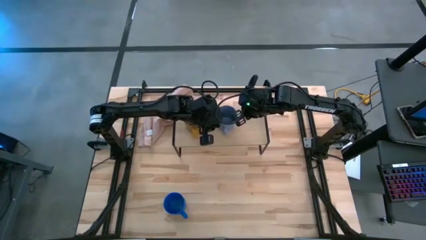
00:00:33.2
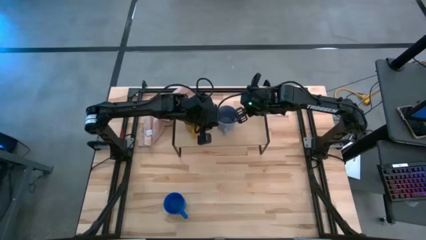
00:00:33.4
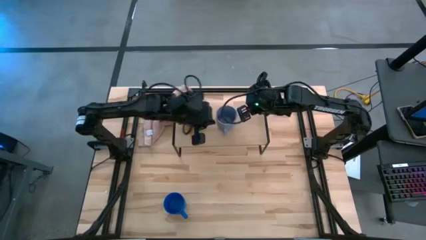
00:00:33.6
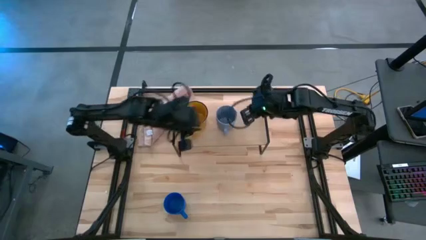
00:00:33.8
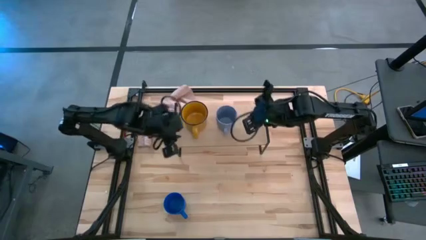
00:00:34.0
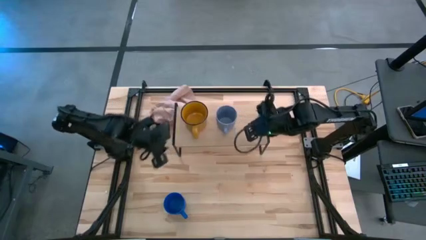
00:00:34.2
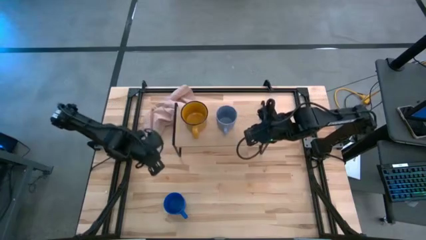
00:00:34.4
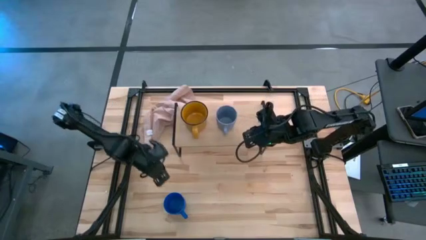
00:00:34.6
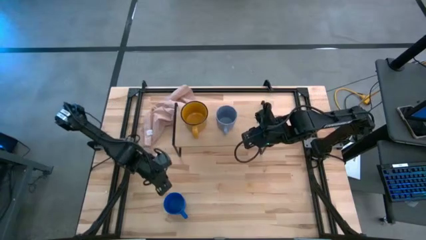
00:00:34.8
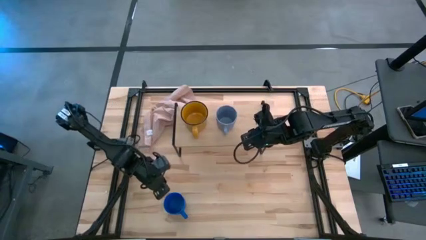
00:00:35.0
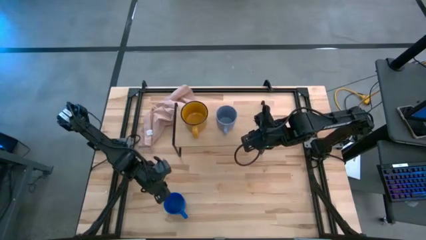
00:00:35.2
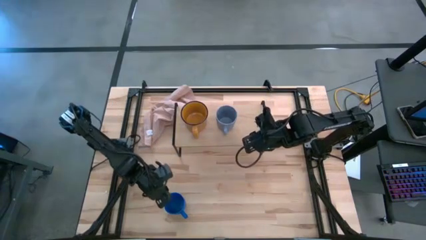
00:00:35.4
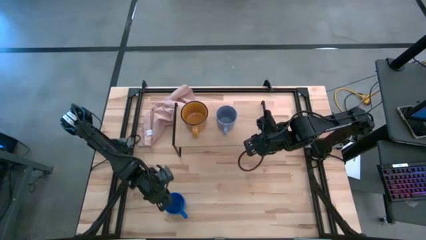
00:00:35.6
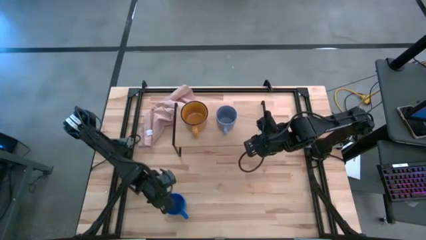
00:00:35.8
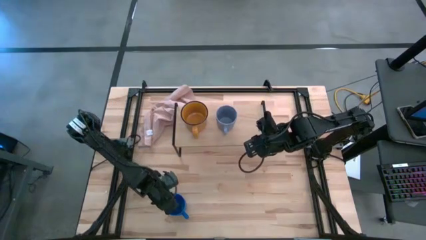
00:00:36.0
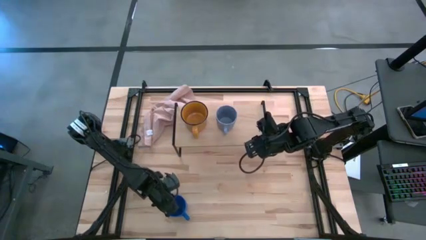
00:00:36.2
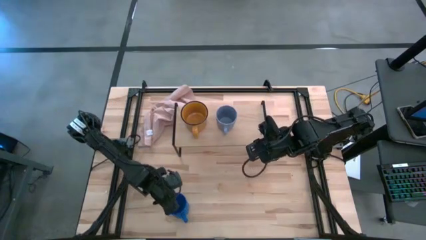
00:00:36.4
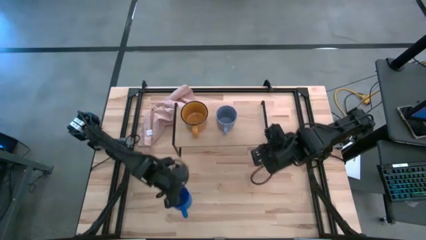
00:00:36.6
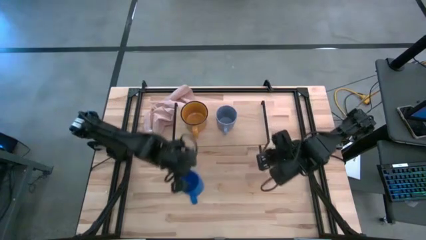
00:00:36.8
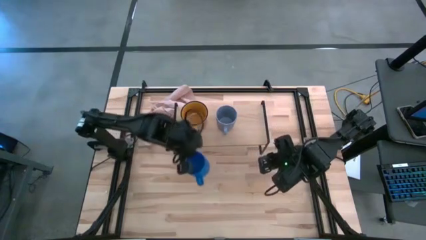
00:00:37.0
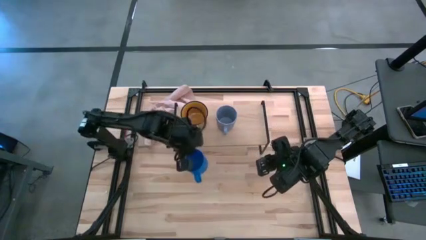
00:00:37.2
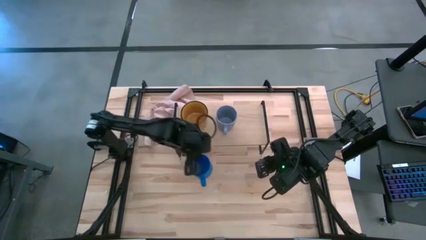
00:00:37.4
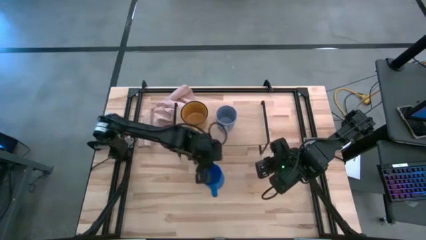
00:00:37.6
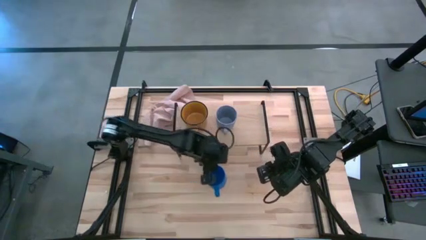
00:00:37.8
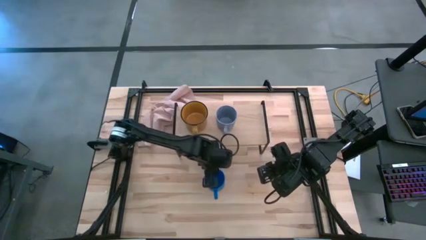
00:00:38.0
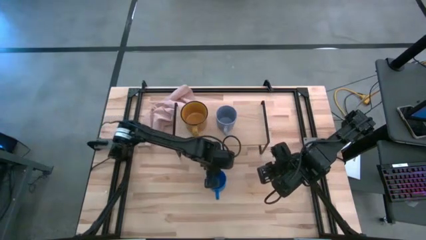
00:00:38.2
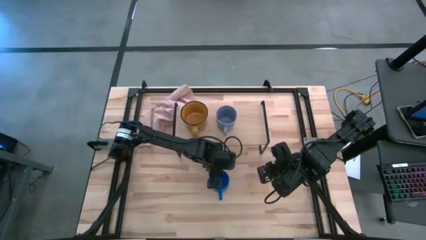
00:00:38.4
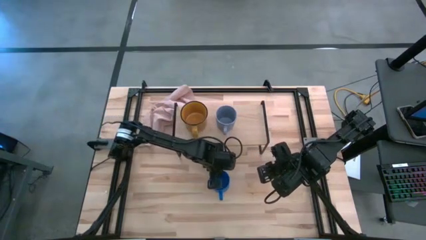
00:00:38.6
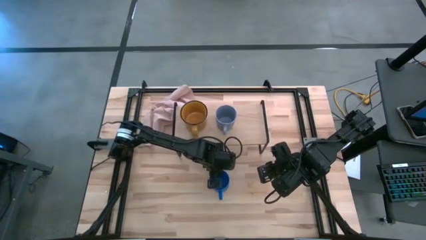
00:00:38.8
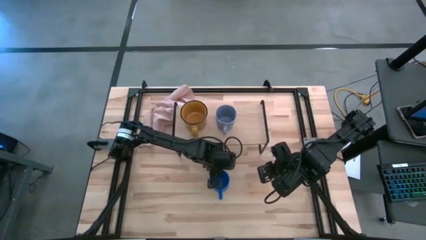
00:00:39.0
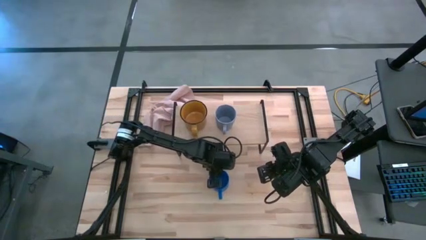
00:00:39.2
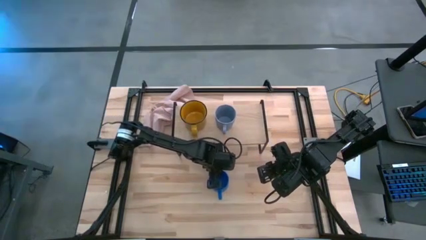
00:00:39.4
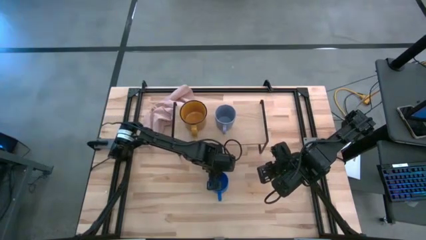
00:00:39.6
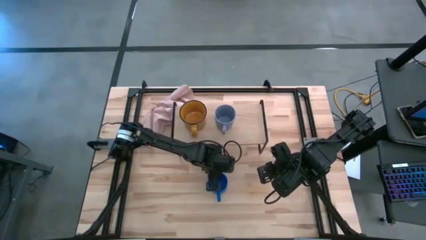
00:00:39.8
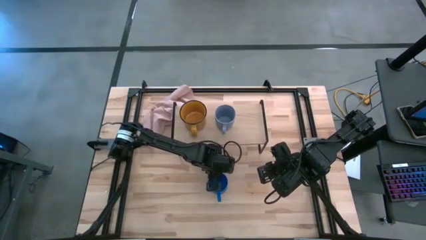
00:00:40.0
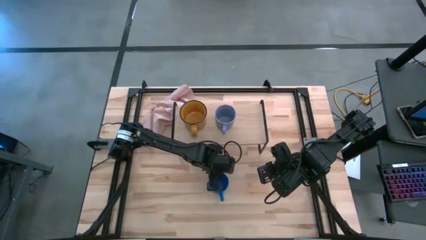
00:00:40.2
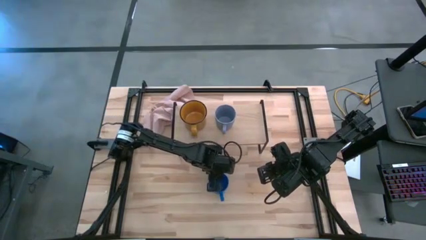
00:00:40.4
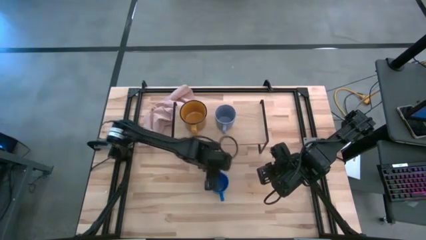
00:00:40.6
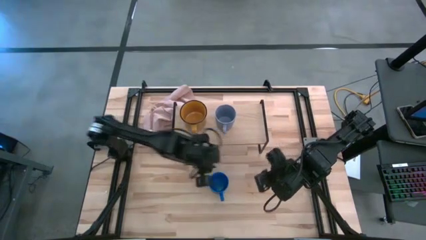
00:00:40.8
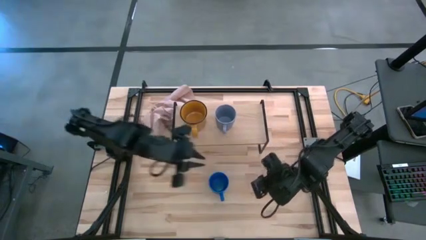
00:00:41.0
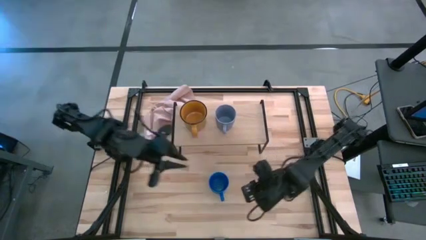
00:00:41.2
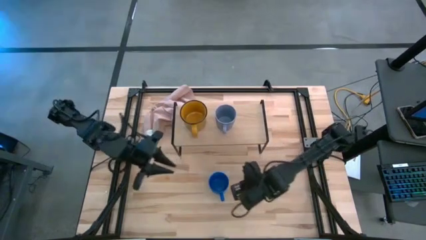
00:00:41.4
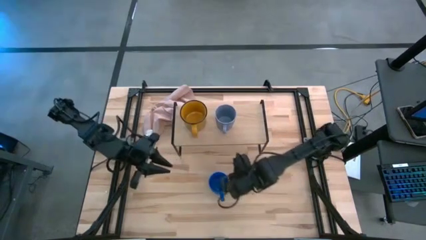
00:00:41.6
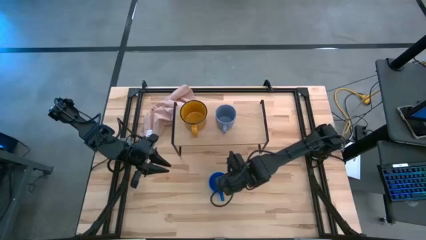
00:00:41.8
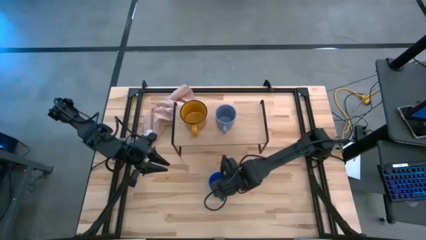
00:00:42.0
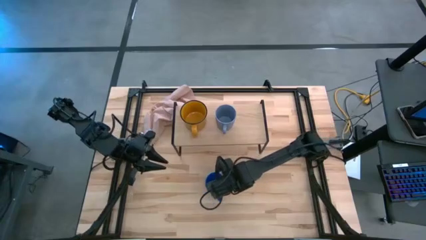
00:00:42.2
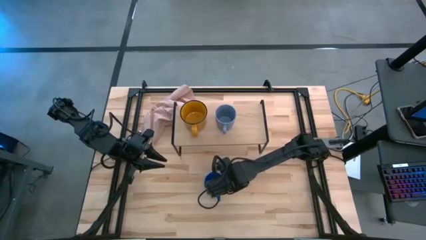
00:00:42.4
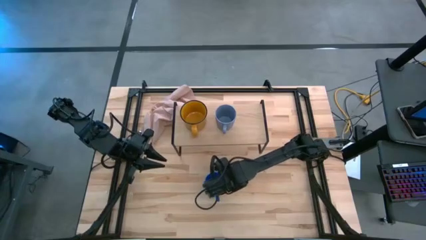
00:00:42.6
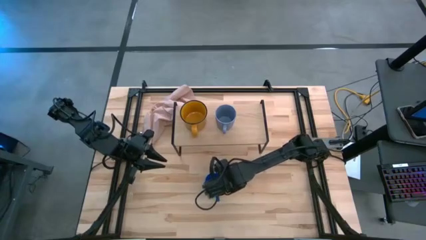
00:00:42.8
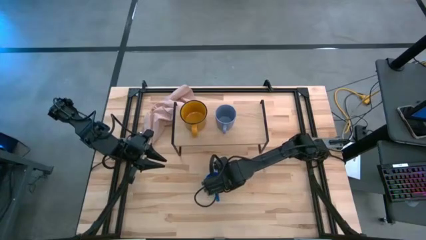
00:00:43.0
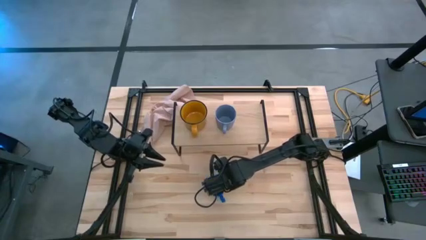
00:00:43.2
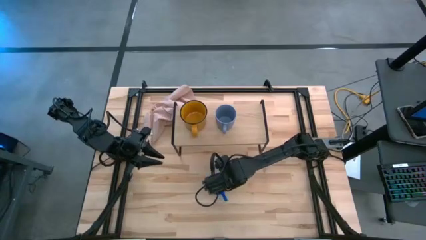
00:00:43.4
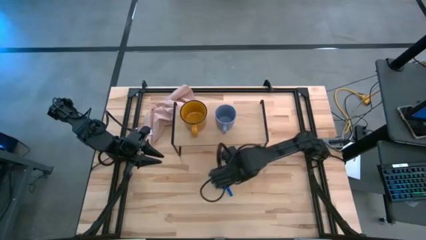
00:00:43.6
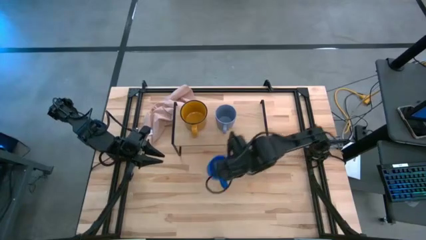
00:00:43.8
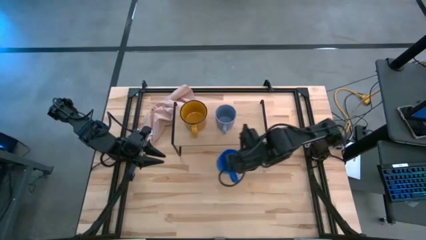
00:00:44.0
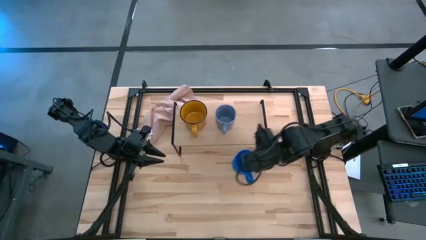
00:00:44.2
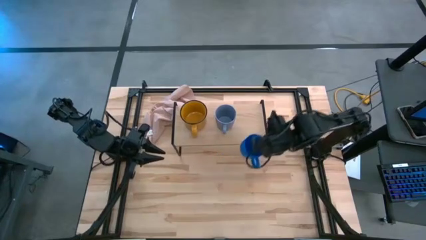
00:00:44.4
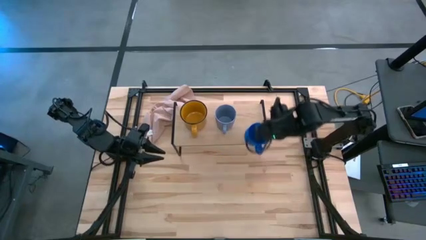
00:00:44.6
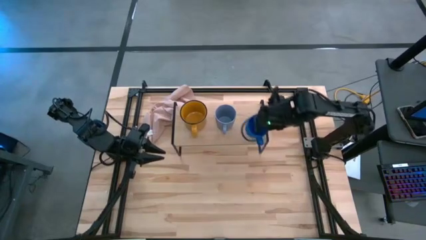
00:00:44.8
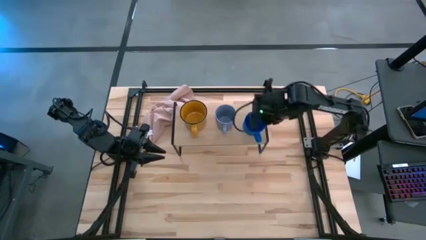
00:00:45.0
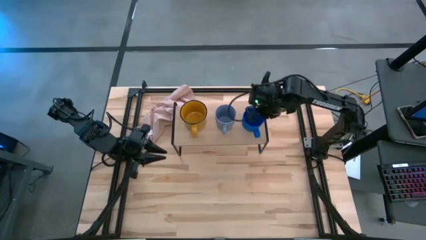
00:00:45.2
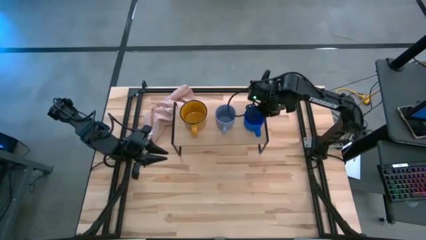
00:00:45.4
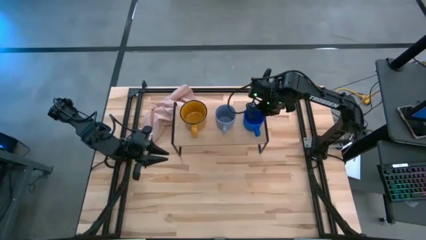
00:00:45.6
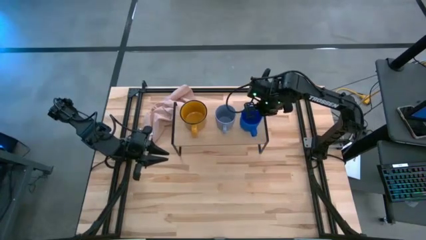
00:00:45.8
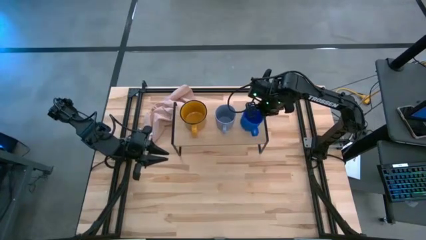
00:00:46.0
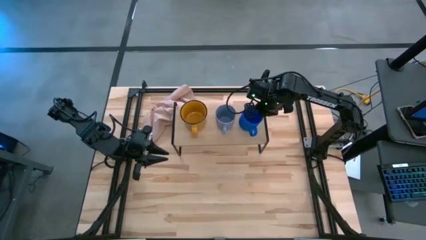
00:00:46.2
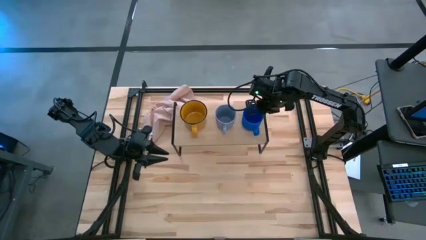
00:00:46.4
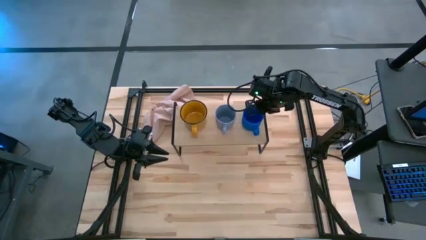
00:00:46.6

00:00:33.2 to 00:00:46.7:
Task: Stack small to large cups/mugs on shelf
Put the blue mug on the shelf
